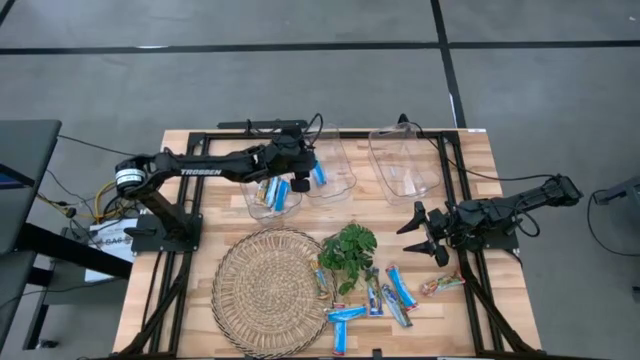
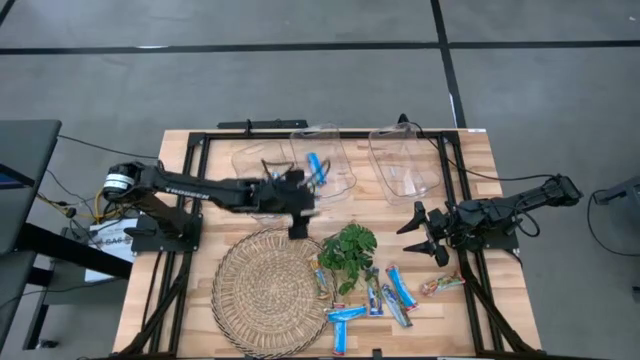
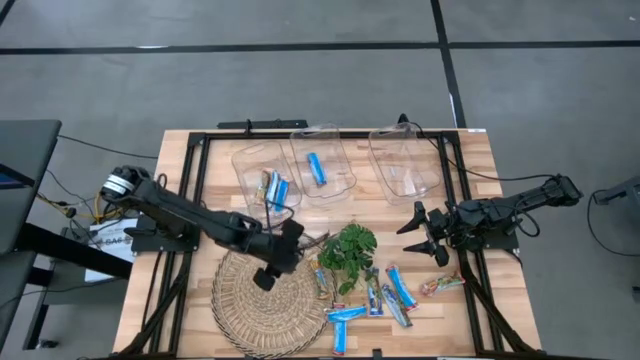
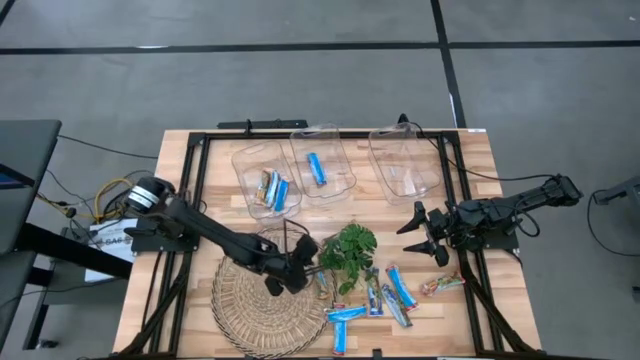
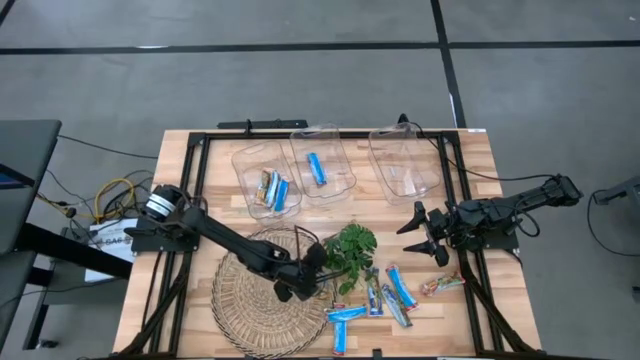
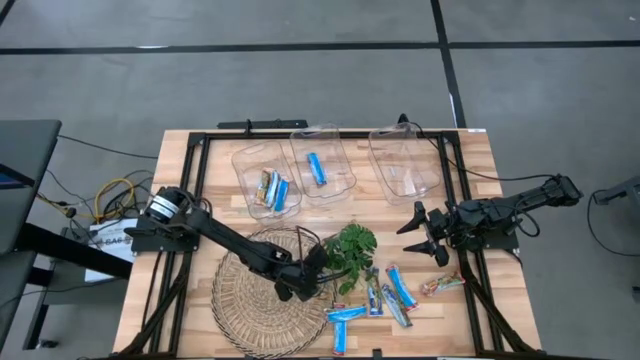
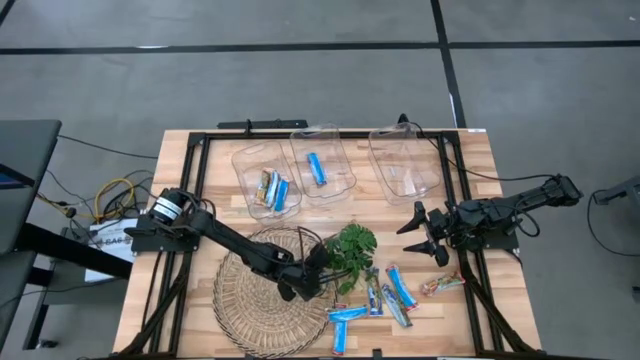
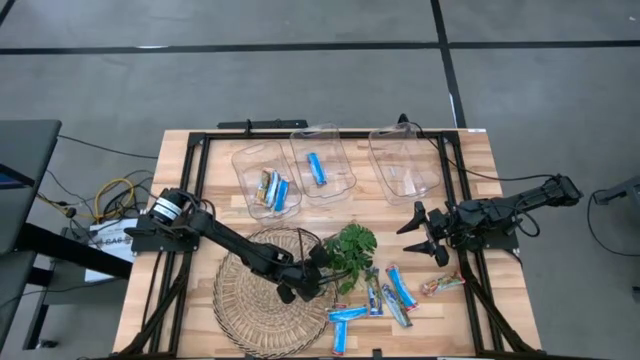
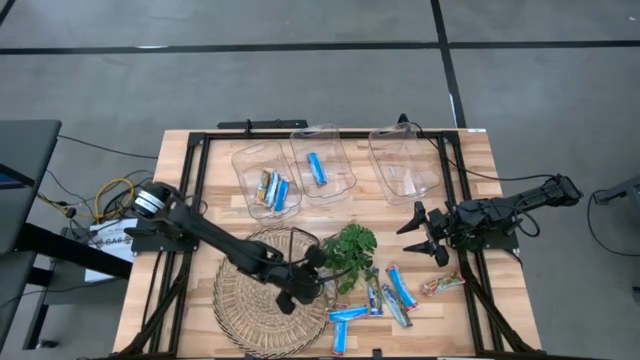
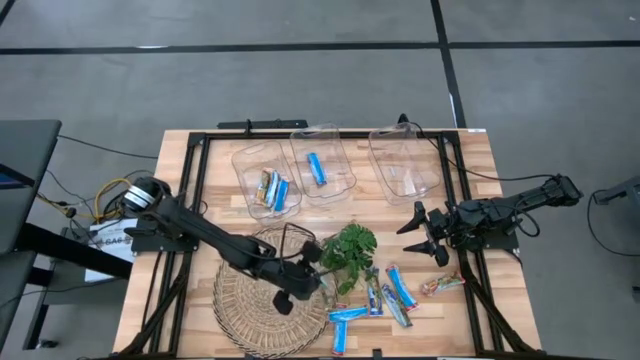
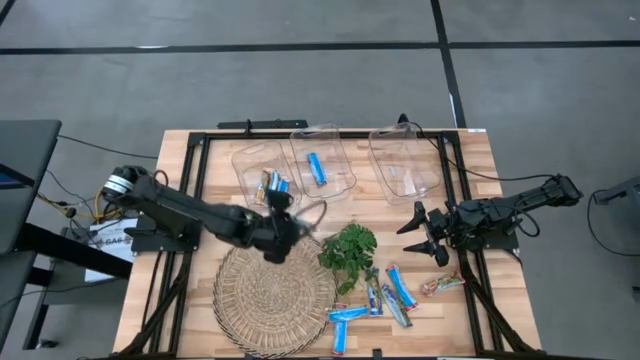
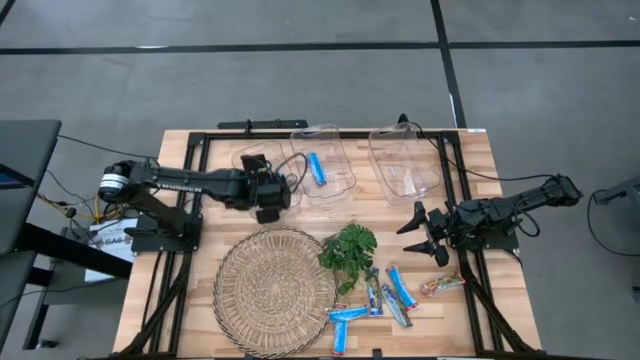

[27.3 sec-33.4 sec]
Task: Pick and place Granola Bars by type
Put the bottom granola bar into the left transparent bin

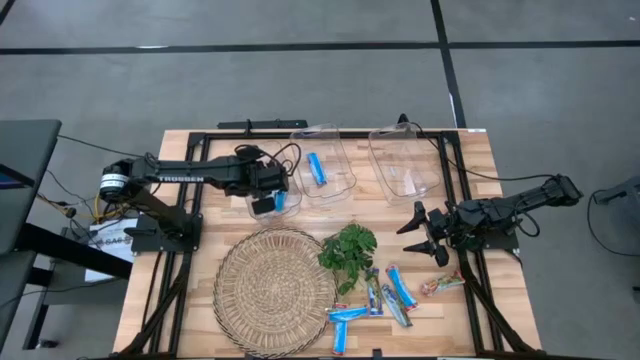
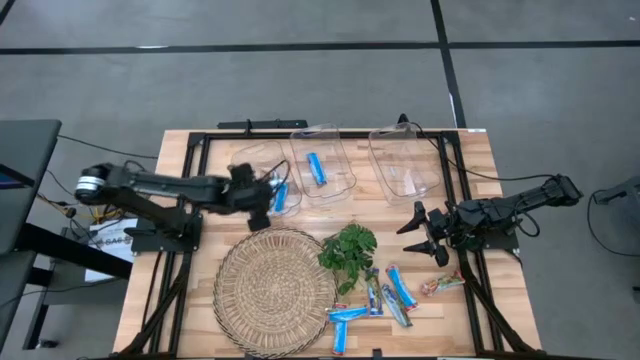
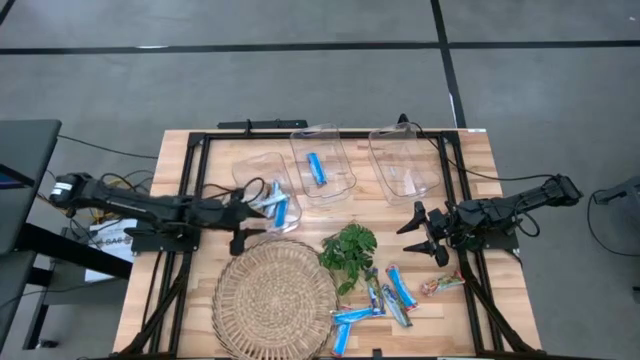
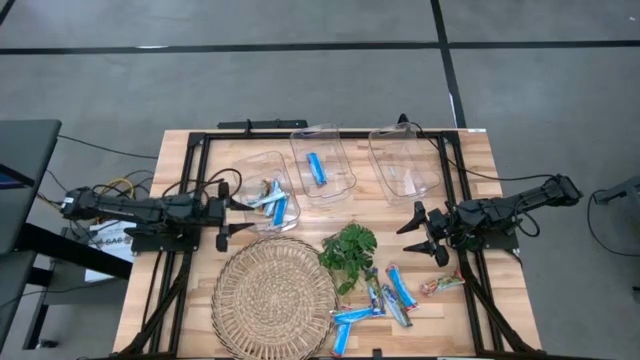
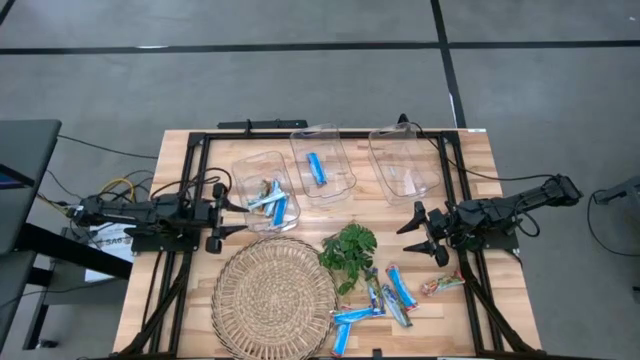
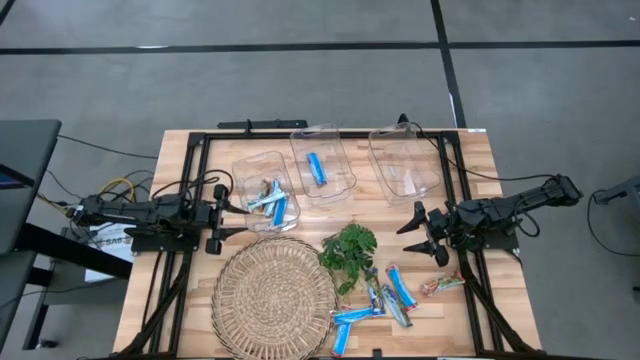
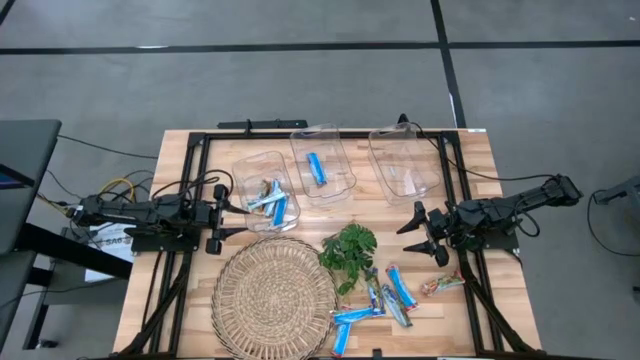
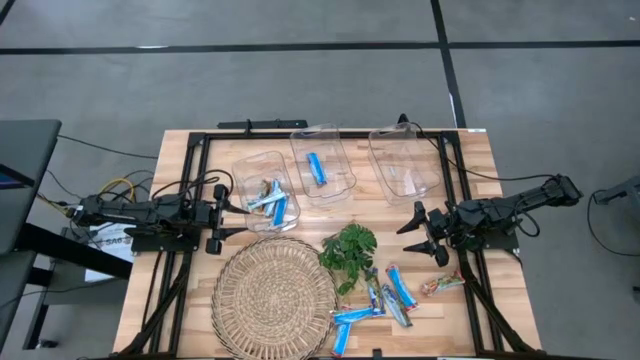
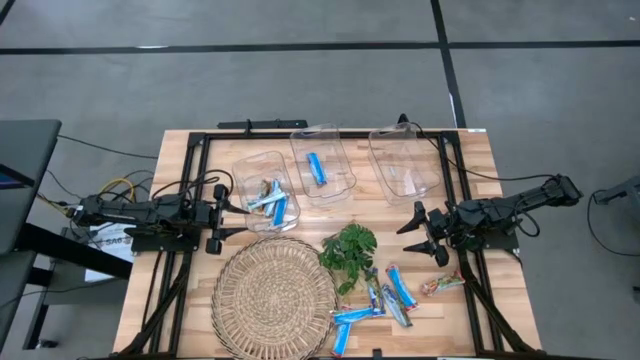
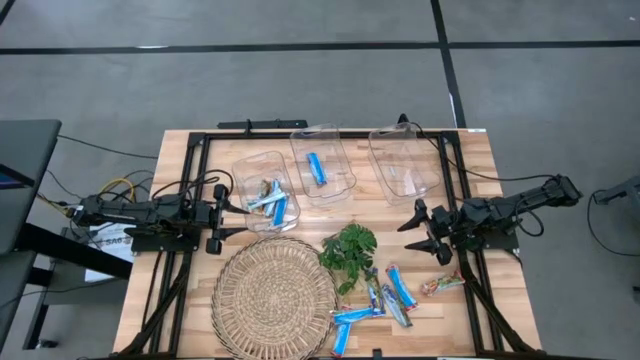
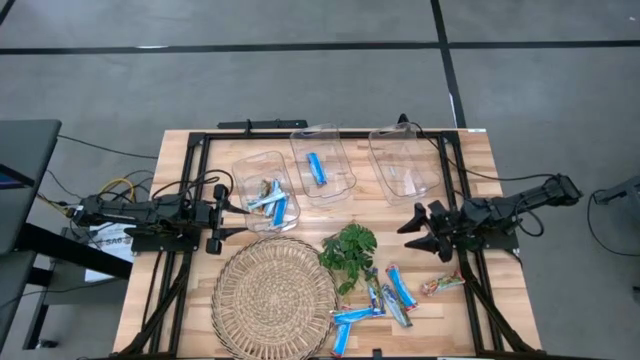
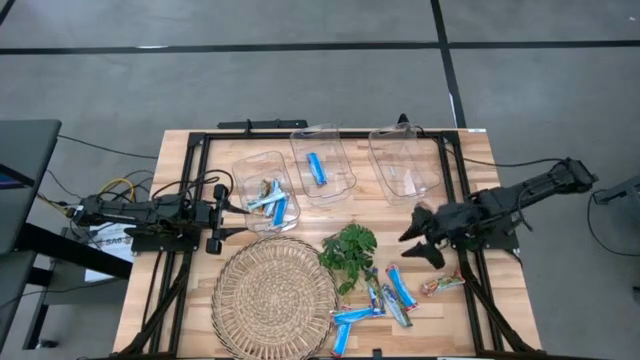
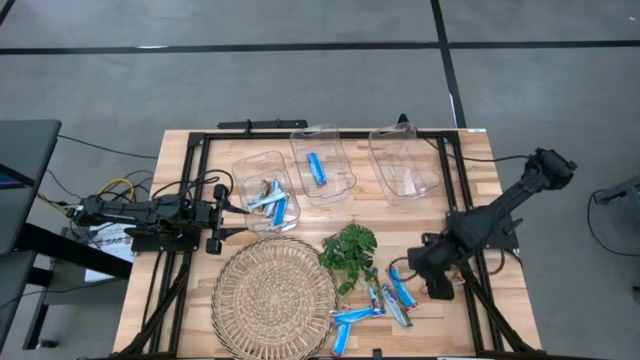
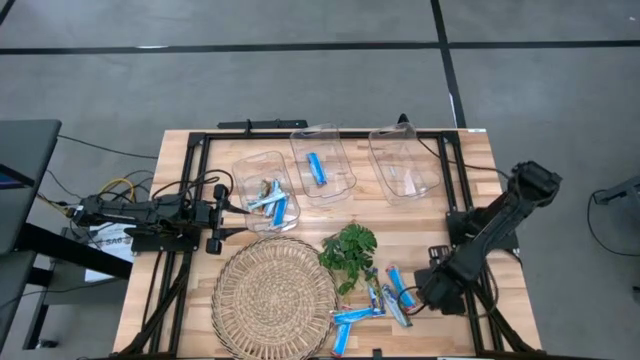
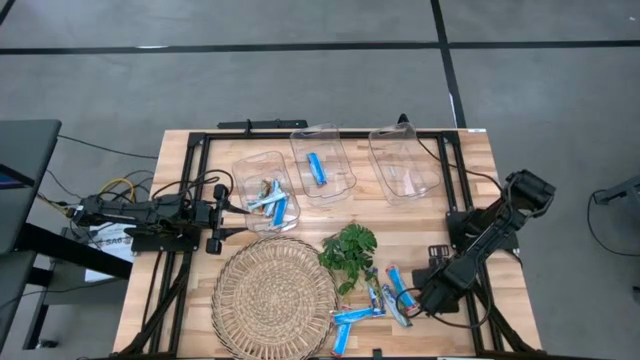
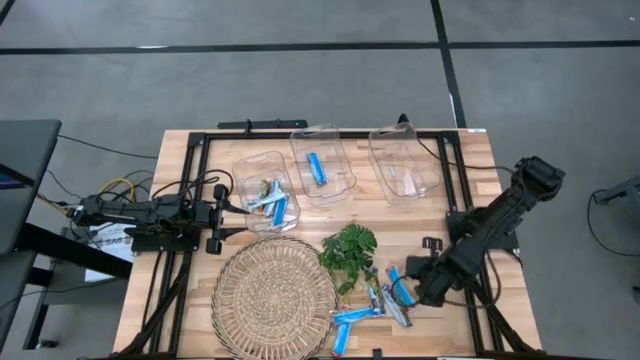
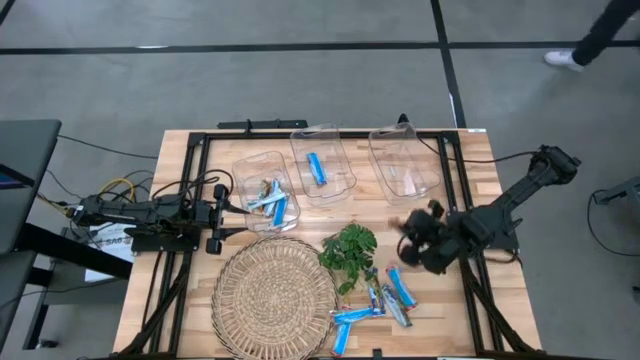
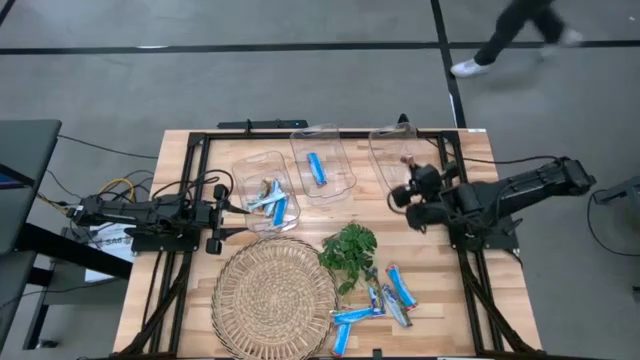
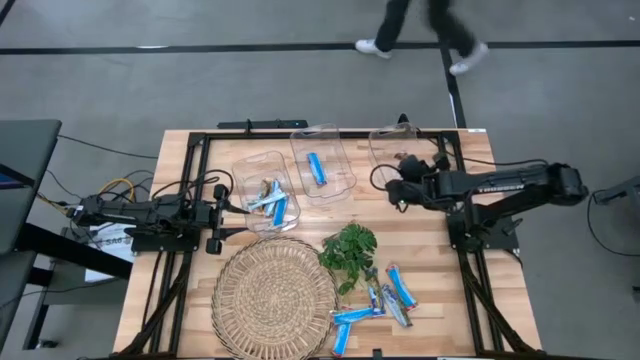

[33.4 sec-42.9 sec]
Put the red granola bar into the right transparent bin

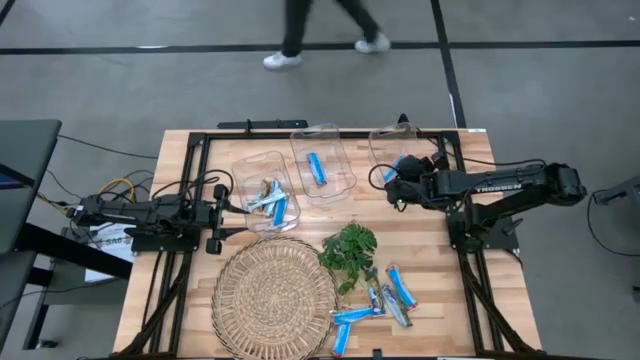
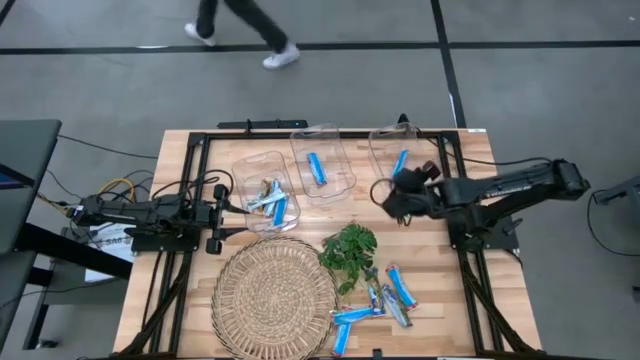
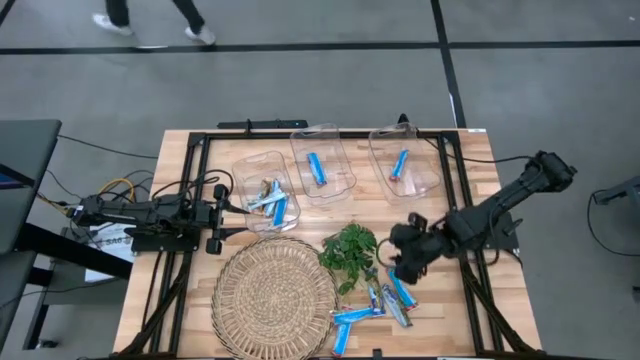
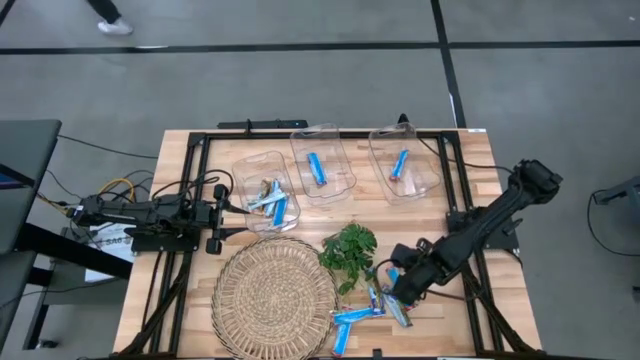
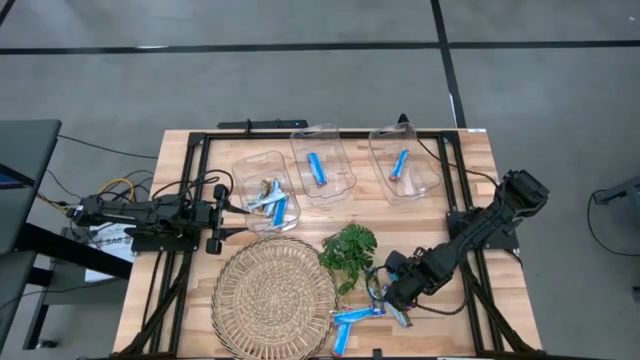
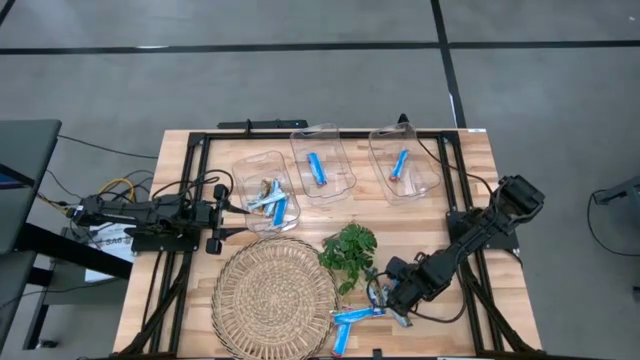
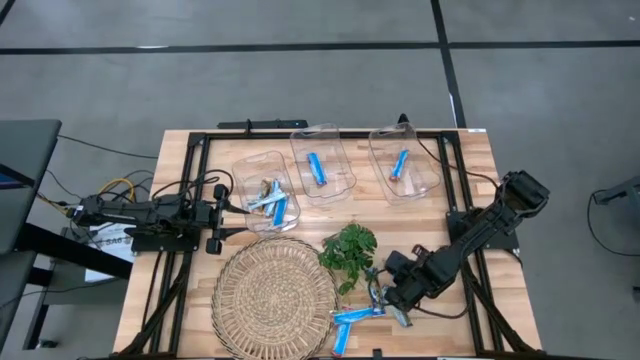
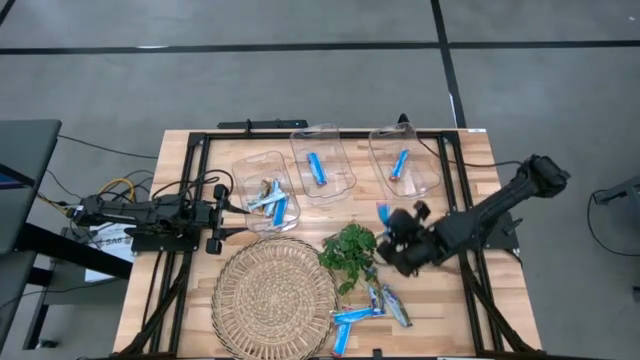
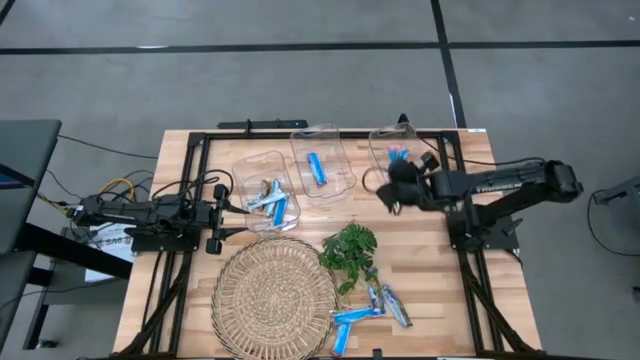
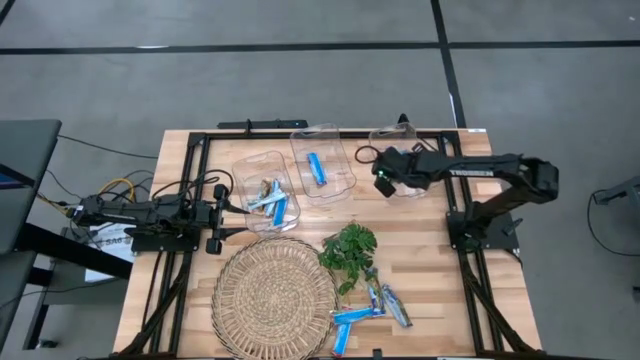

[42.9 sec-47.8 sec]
Put the right red granola bar into the right transparent bin

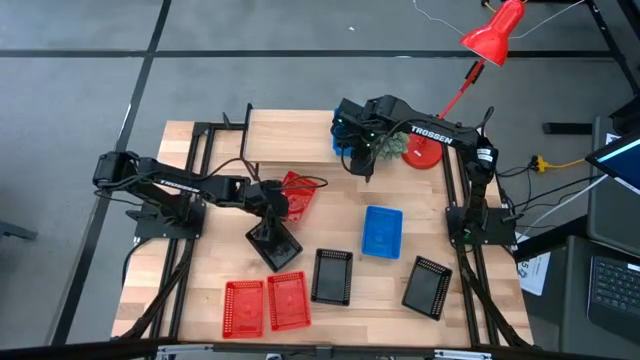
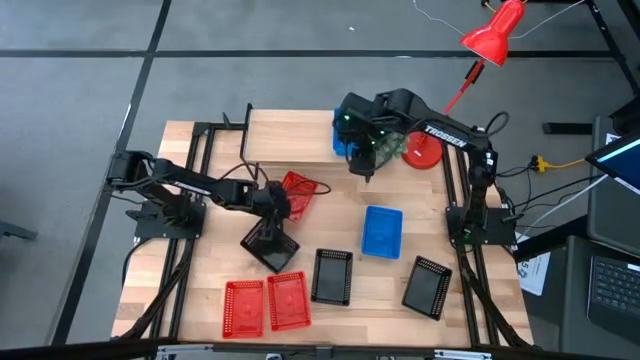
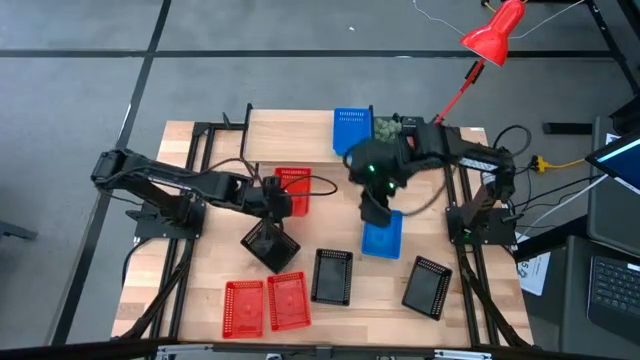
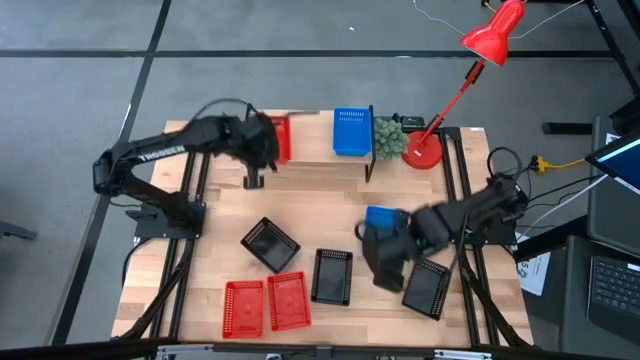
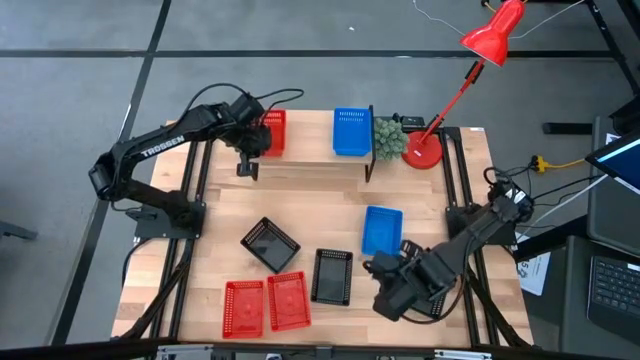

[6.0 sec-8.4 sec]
Task: Stack baskets on shelf by color
Put the top red bin on the shelf
